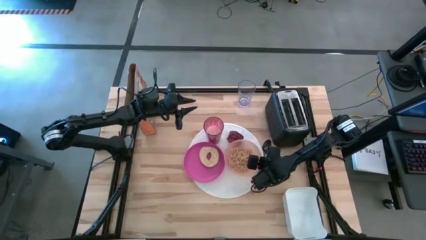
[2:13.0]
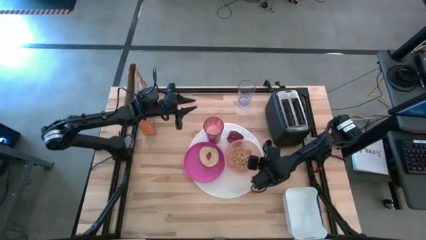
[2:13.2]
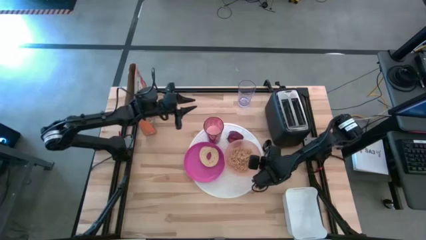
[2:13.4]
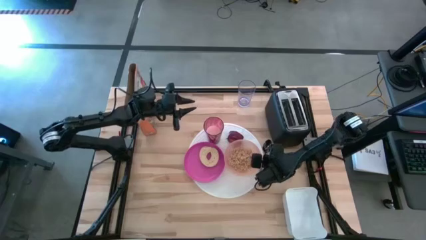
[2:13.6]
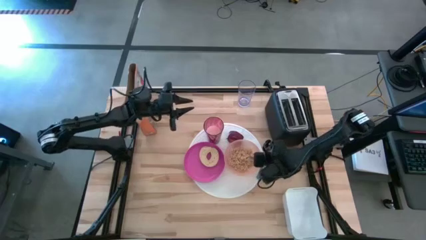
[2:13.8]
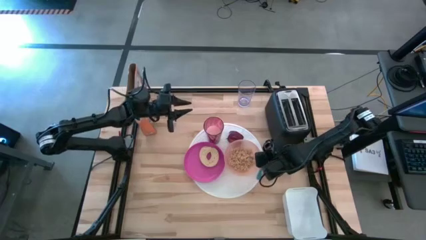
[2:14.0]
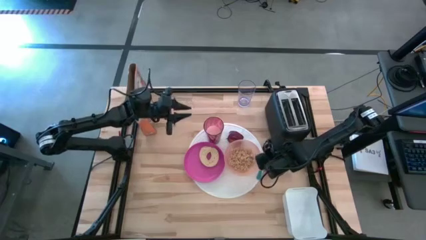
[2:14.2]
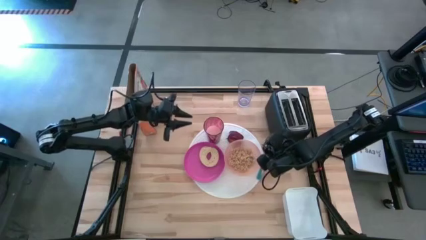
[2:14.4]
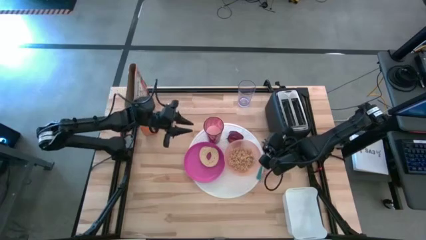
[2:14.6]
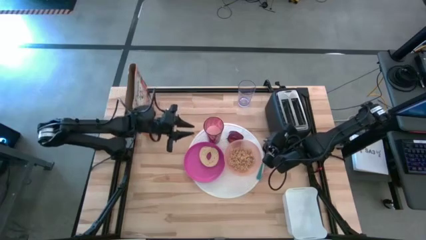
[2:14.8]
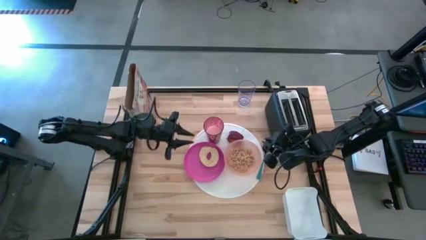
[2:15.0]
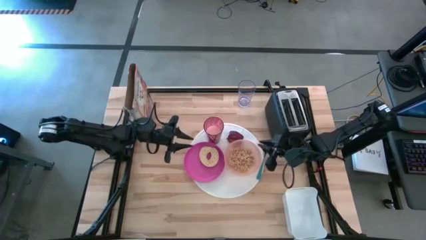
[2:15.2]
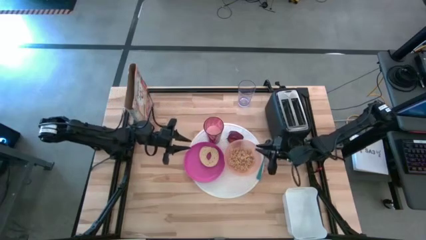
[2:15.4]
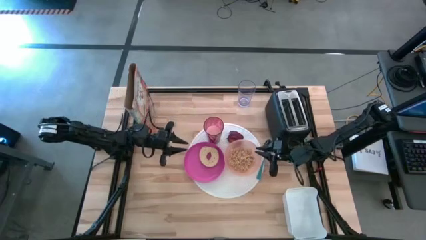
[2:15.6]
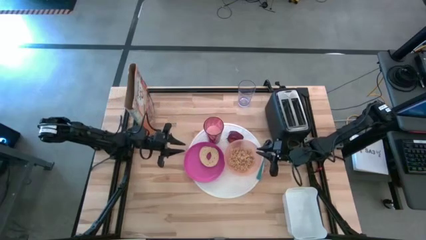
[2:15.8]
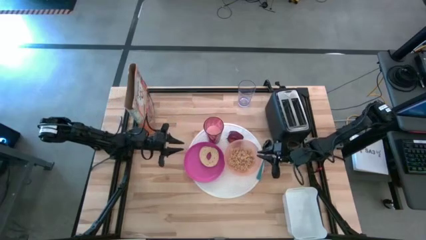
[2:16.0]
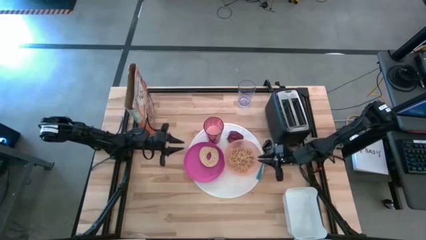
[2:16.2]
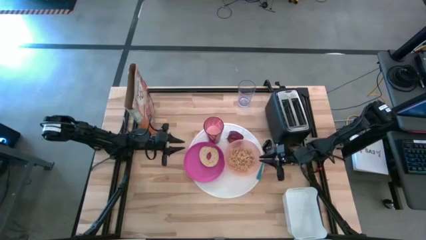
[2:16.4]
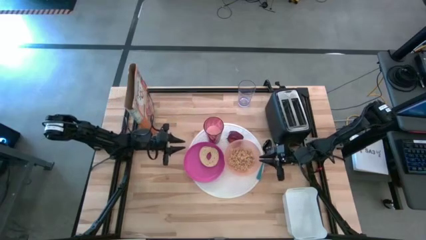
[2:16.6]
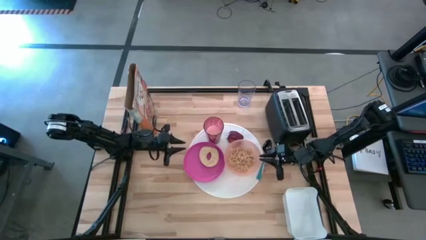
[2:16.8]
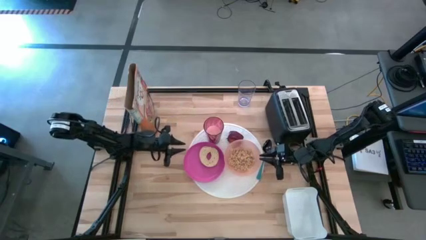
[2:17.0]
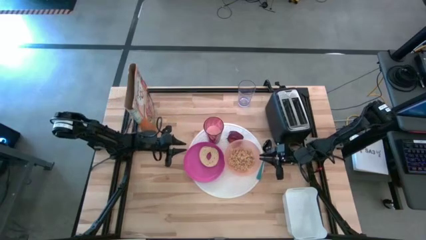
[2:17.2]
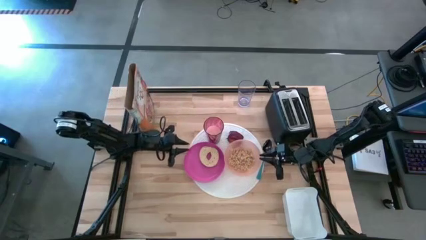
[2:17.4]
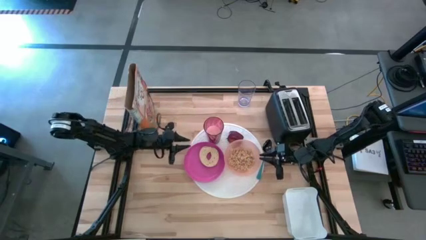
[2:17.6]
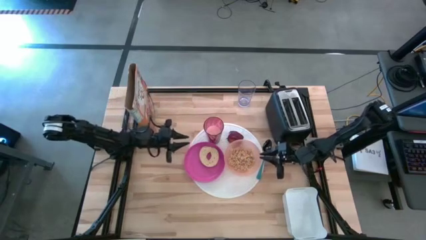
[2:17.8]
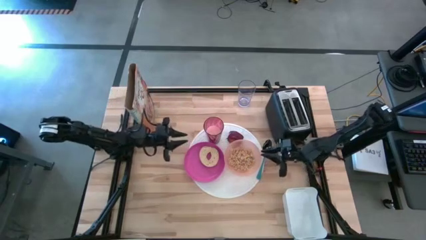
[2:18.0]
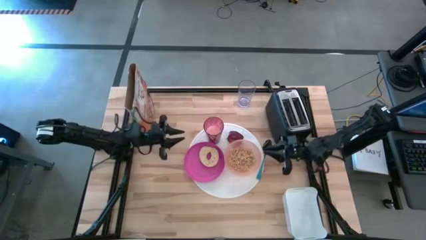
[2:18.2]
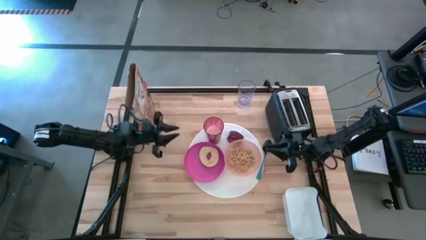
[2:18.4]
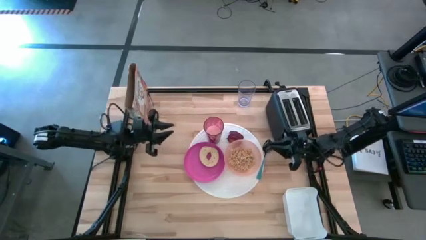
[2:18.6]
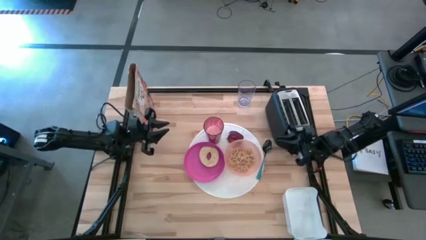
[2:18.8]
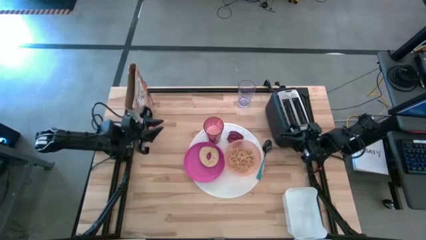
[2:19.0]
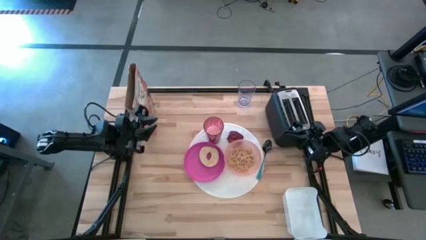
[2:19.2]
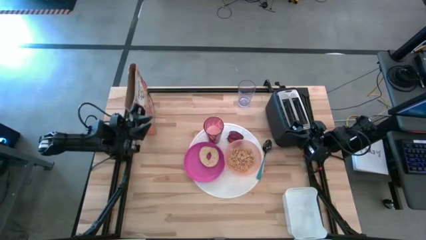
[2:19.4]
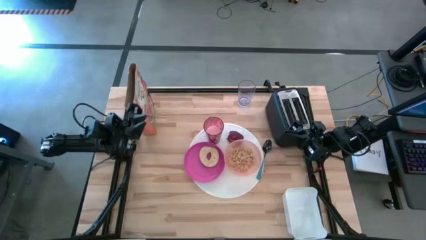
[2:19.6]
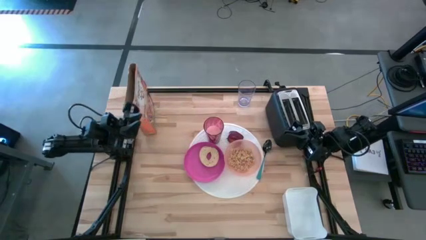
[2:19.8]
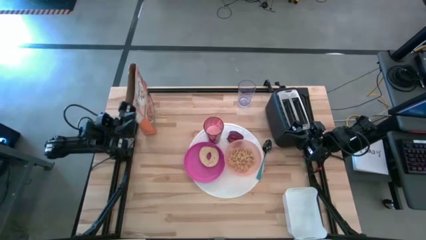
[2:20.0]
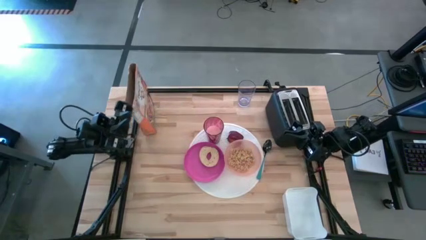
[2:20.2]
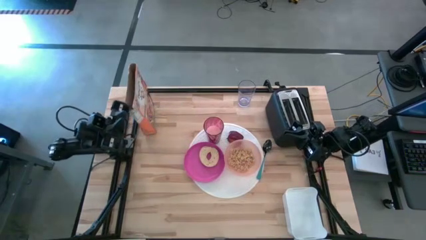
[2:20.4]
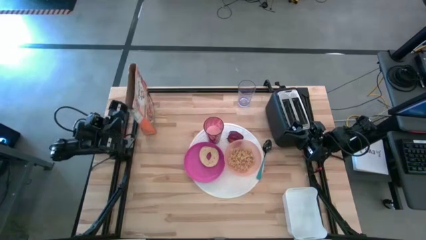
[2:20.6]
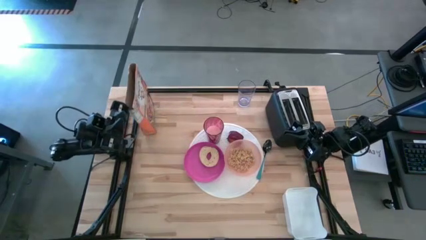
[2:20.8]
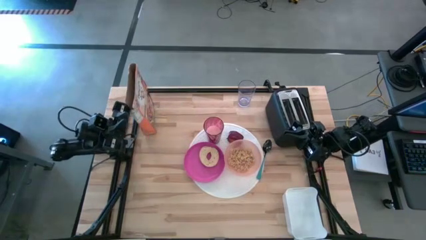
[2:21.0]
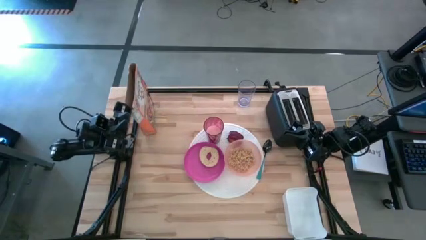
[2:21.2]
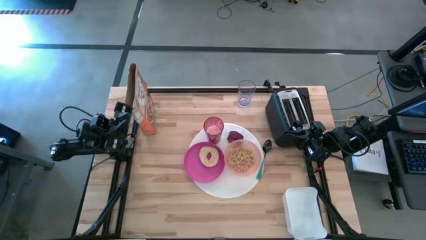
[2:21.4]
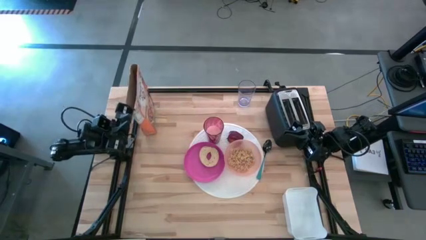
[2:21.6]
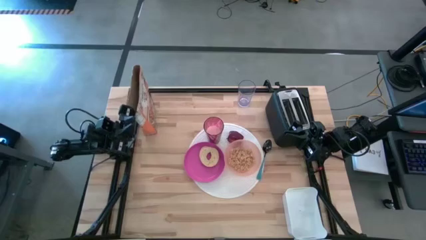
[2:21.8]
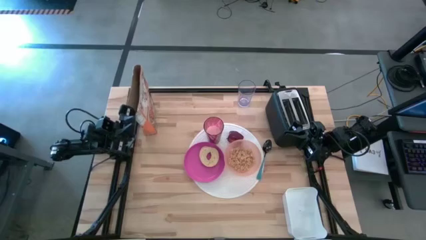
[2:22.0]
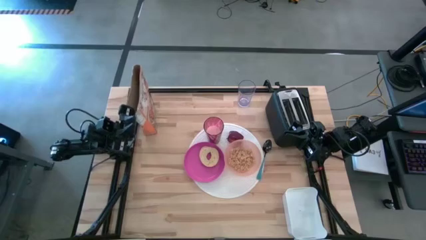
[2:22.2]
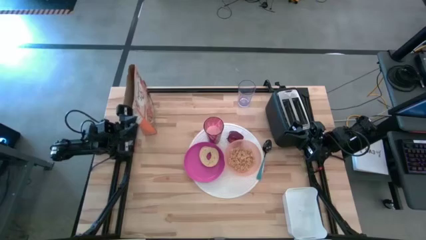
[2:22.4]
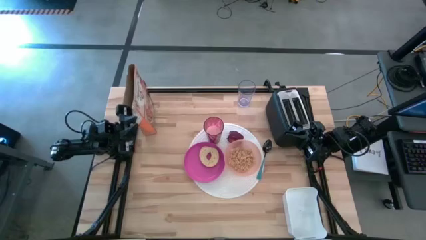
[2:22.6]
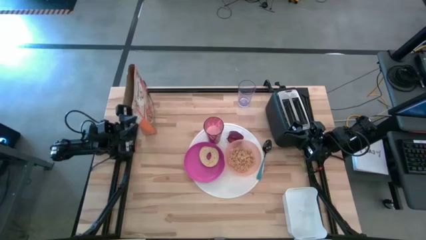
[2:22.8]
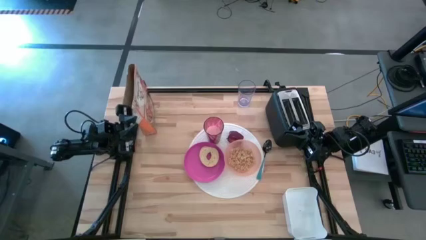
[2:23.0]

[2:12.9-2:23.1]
Task: Arrange a breakfast setting
Return to Home Position
